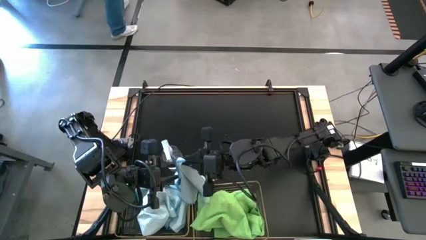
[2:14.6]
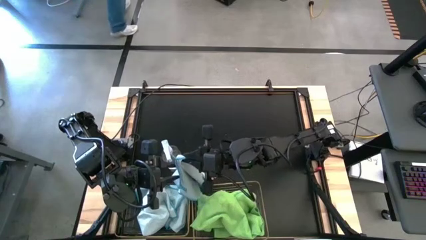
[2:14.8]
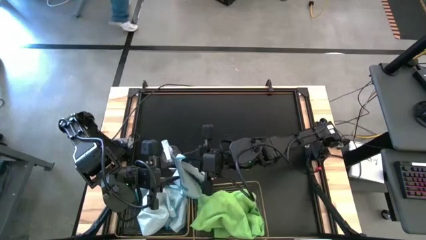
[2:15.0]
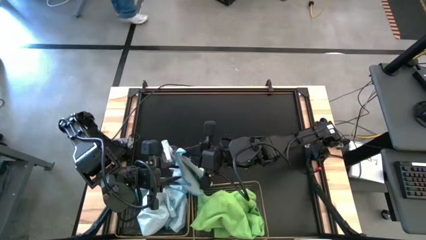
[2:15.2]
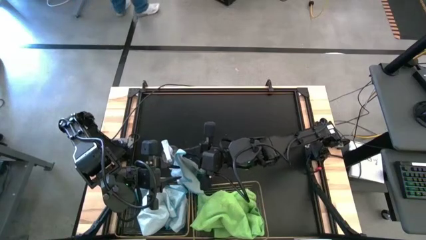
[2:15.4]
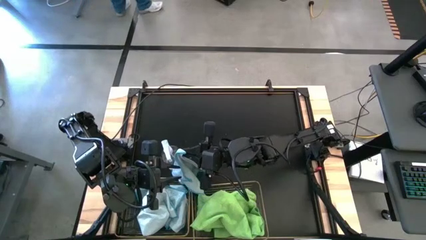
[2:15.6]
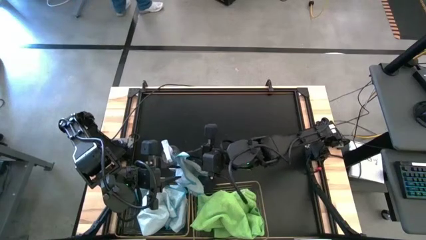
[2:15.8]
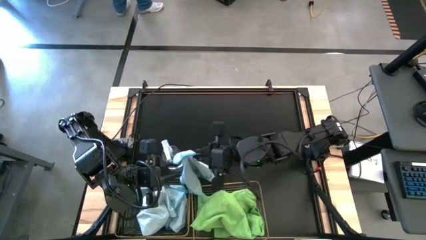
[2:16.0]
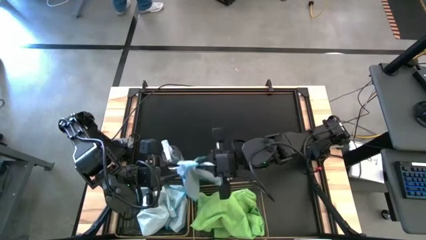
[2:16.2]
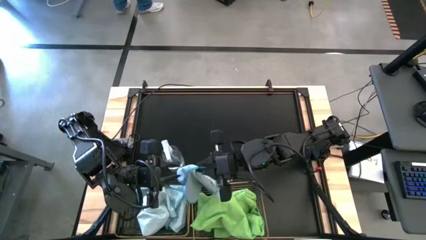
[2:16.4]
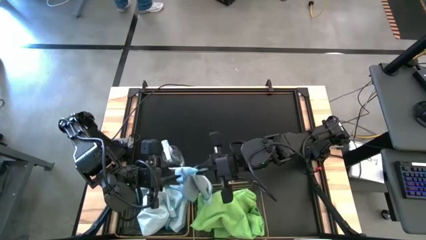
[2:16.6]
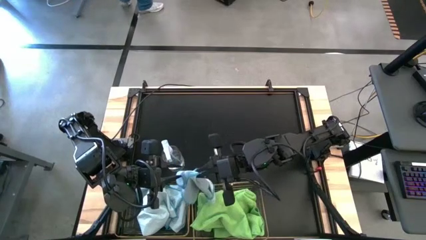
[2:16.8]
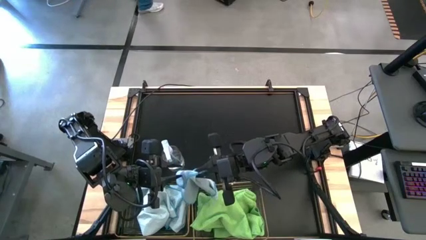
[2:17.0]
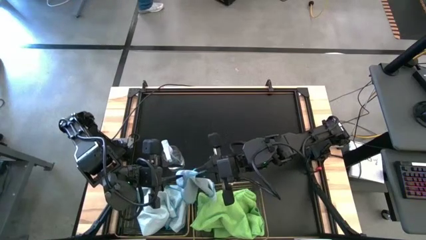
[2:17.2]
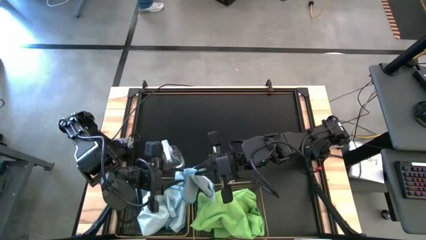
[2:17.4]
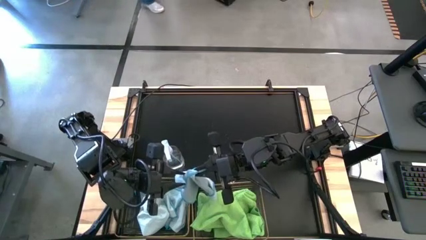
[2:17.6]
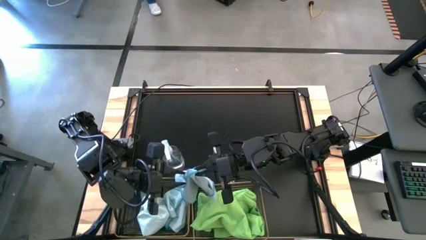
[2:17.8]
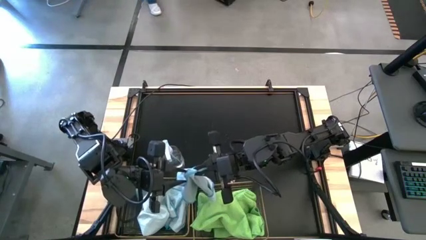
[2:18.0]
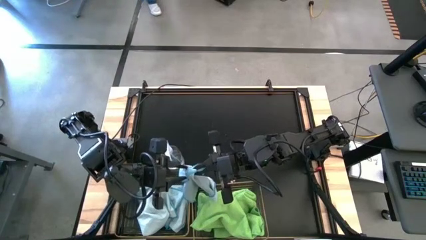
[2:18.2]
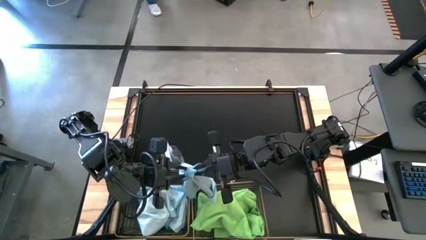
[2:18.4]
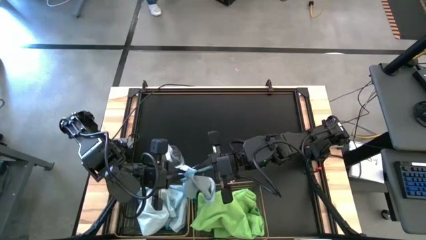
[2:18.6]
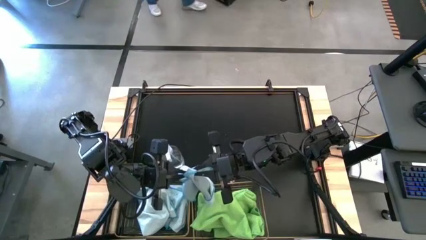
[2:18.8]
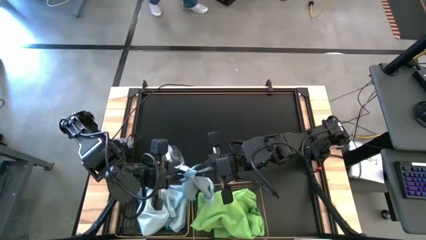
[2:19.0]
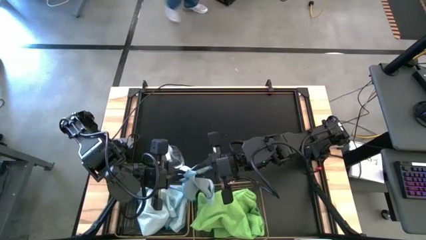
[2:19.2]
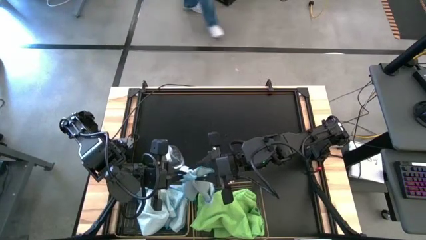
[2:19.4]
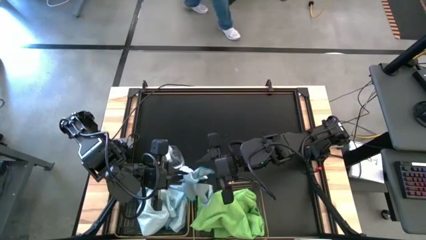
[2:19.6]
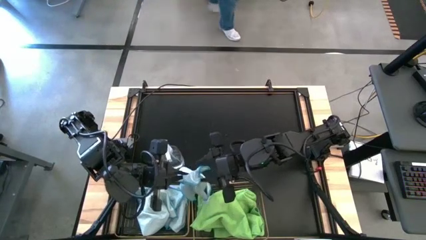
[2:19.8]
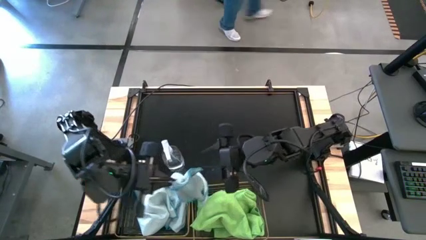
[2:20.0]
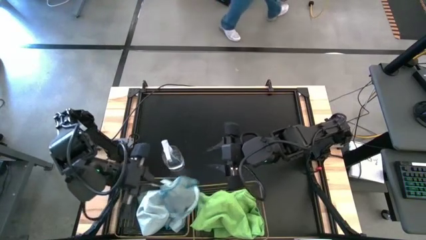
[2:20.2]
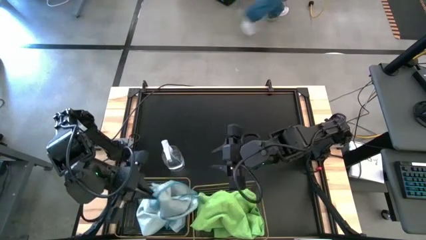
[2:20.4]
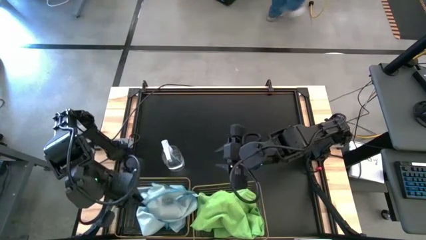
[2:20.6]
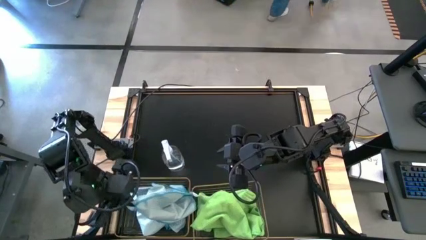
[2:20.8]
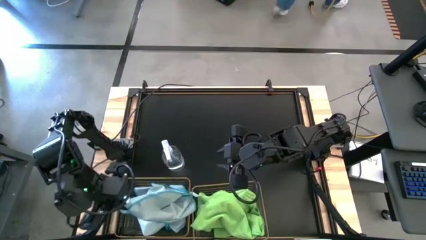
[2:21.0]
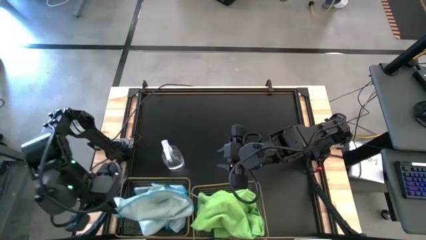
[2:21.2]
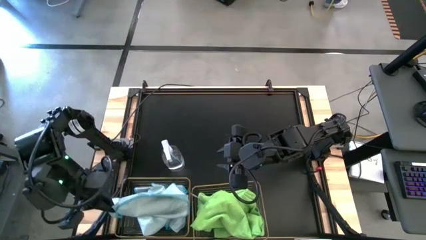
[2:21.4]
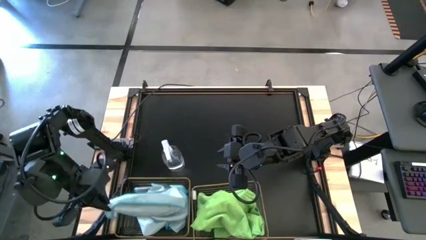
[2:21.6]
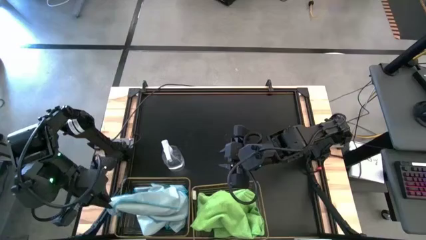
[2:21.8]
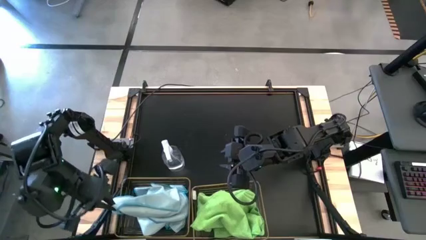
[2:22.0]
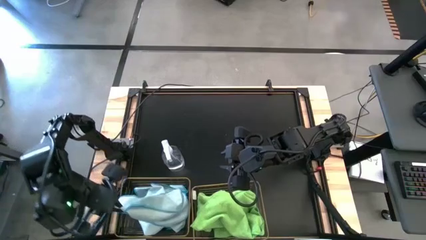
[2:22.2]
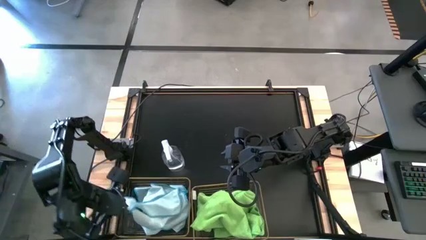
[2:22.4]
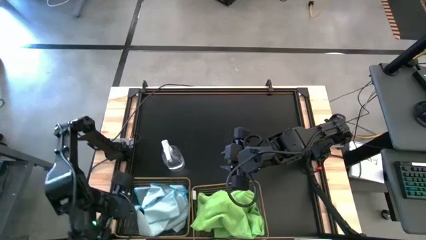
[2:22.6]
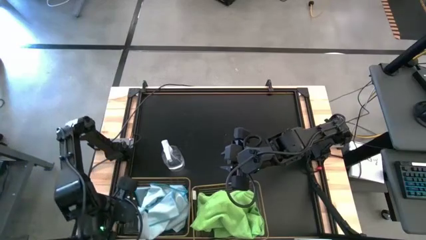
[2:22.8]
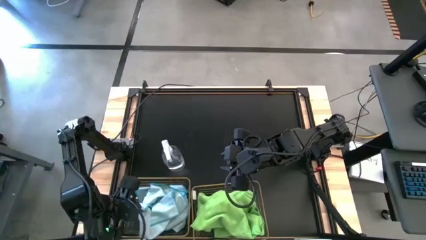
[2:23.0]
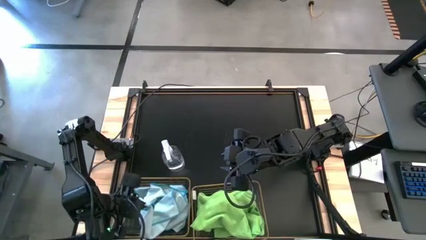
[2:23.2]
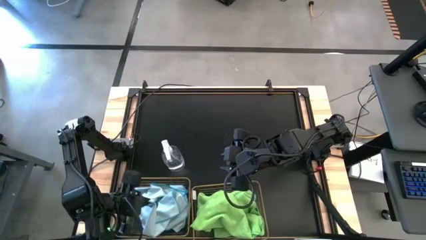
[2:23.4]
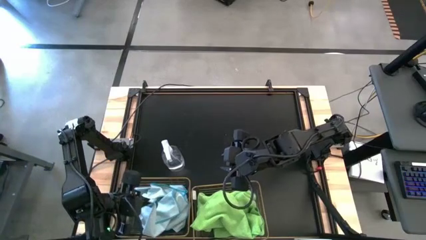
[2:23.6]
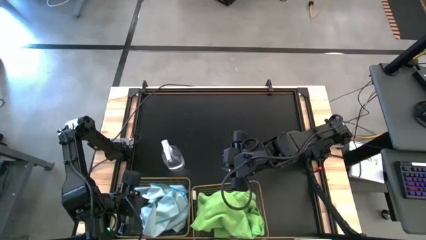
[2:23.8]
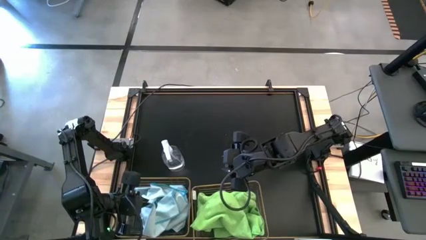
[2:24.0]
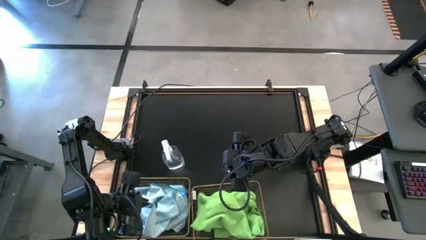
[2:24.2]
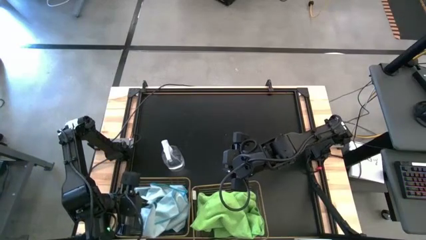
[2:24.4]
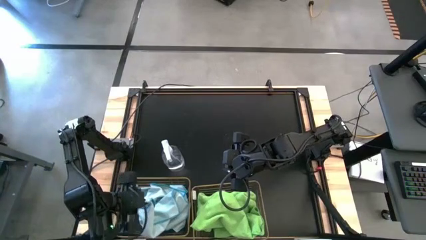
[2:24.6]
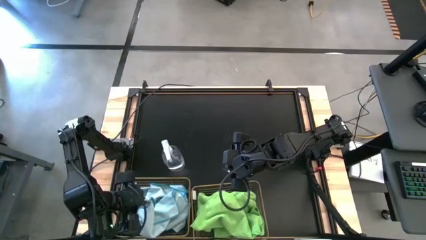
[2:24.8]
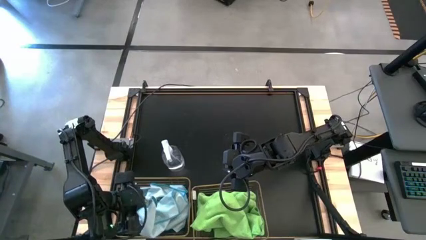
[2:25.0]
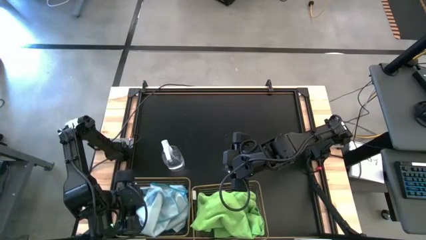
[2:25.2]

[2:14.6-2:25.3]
Task: Sort microfiber towel by color & place in baskets
Put the white microfiber cloth into the left wire basket

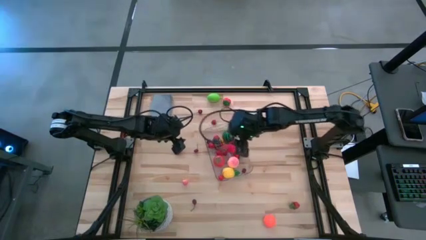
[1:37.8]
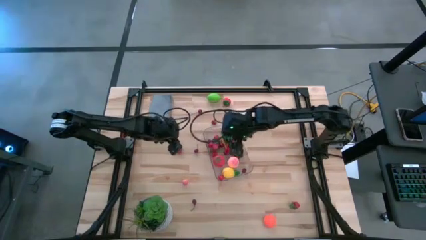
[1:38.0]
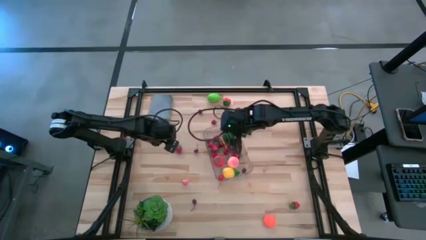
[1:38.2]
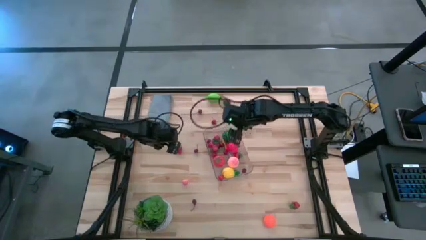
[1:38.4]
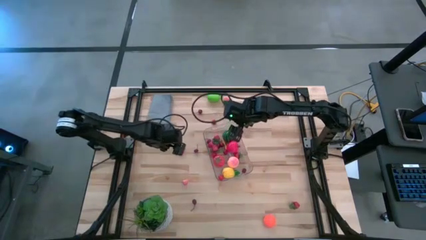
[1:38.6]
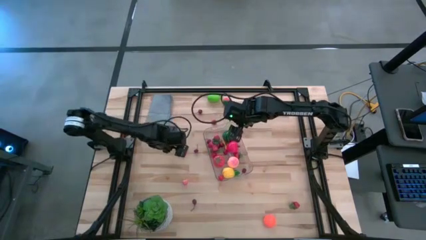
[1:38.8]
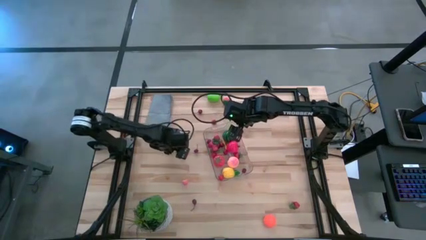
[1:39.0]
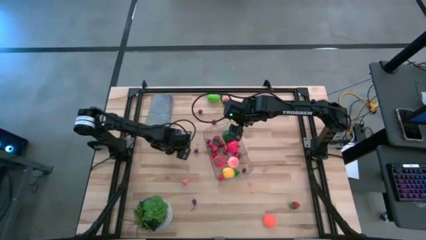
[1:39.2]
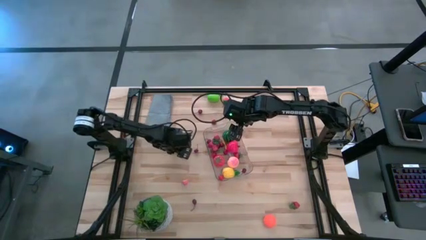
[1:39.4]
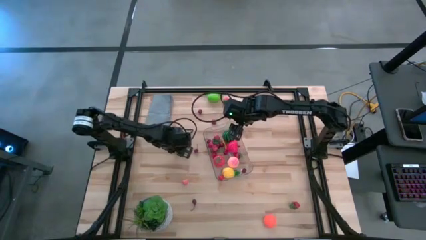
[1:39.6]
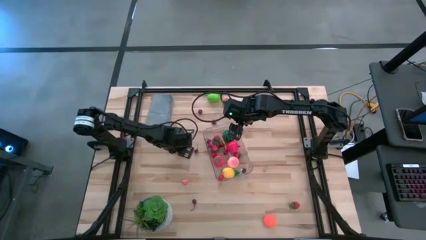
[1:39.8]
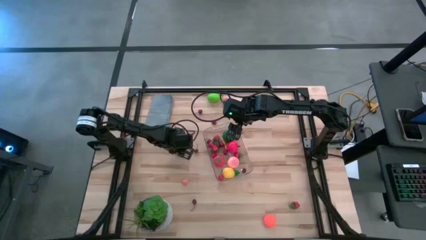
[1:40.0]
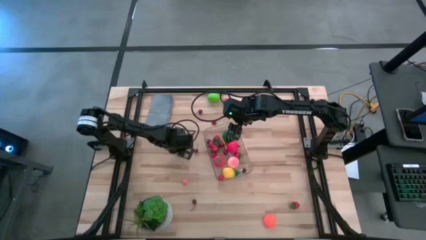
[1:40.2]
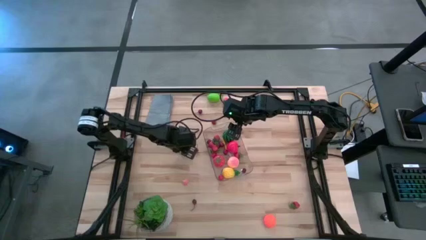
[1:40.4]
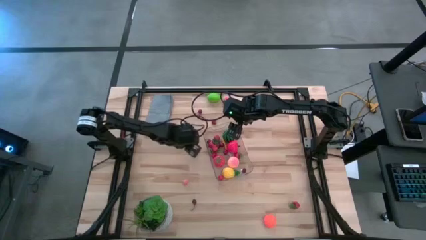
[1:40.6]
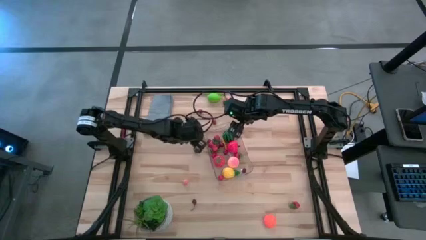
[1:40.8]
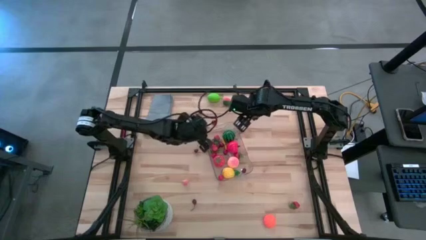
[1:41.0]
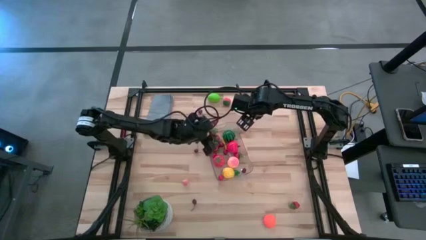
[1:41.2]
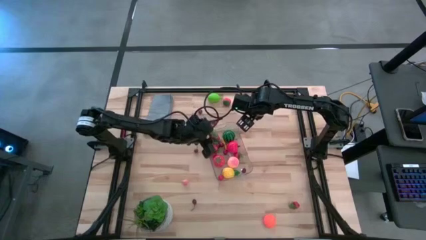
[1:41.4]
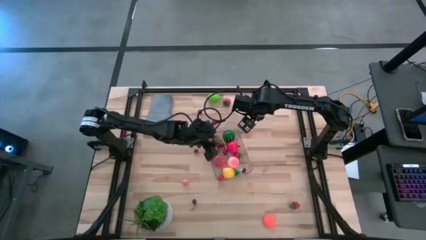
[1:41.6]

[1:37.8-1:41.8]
Task: Pick and placing Produce into tupperware
Put the red strawberry into the transparent bin

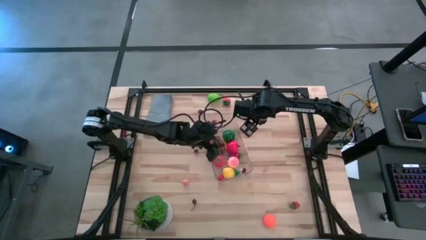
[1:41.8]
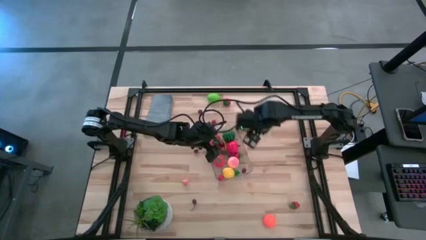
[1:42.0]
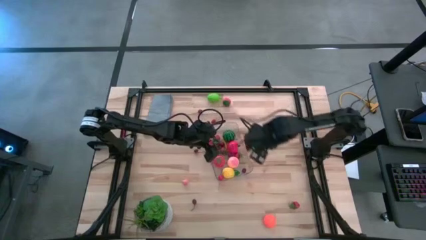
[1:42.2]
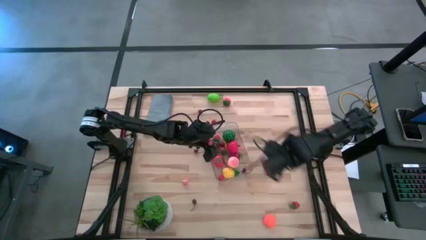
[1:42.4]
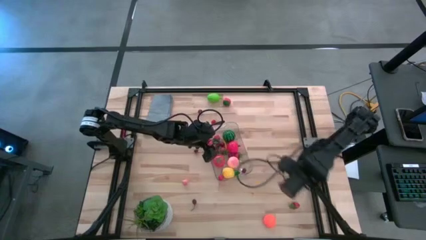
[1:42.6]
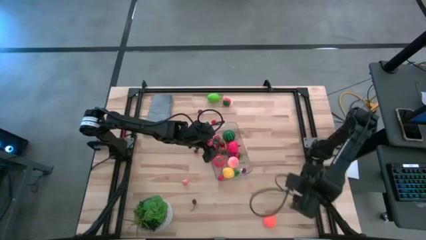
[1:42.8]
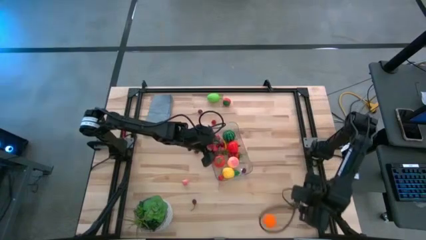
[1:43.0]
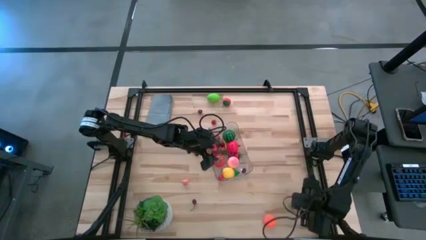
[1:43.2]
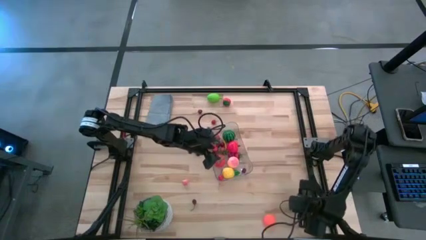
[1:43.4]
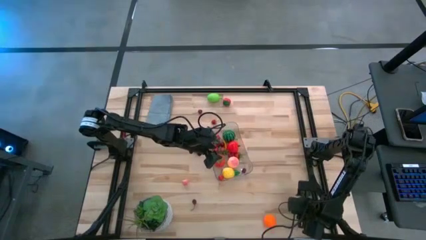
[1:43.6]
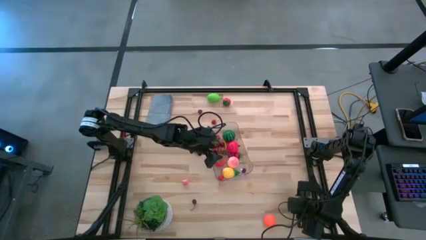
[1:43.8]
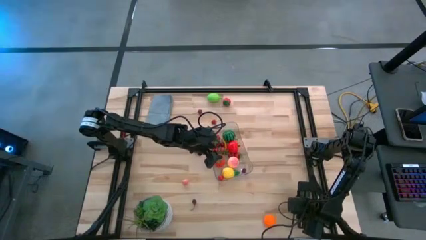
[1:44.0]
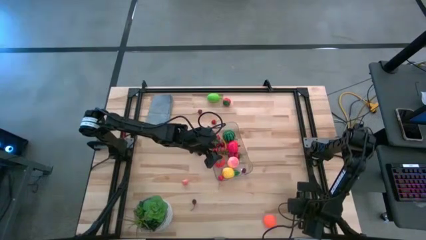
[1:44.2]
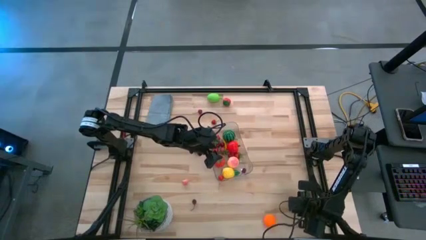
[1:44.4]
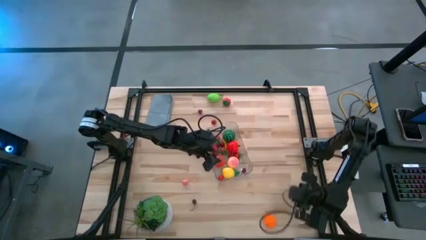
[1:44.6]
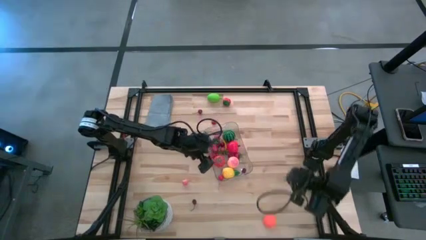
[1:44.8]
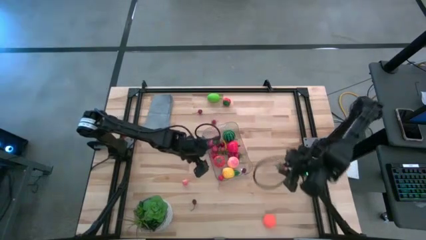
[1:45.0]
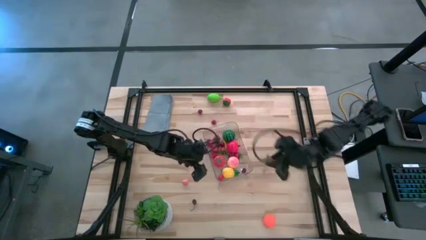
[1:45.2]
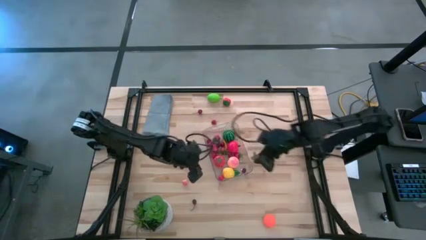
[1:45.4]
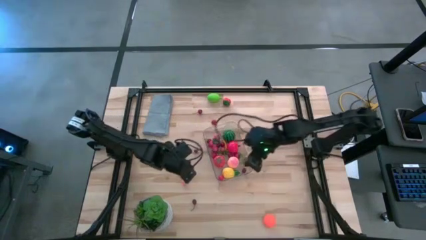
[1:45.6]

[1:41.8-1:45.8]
Put the red strawberry into the transparent bin
